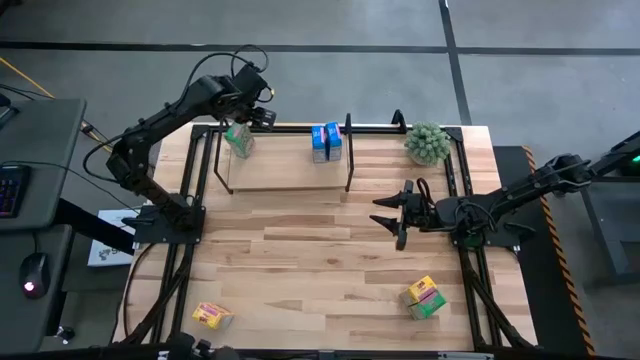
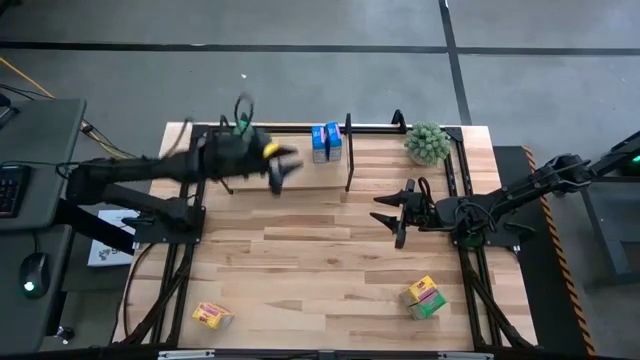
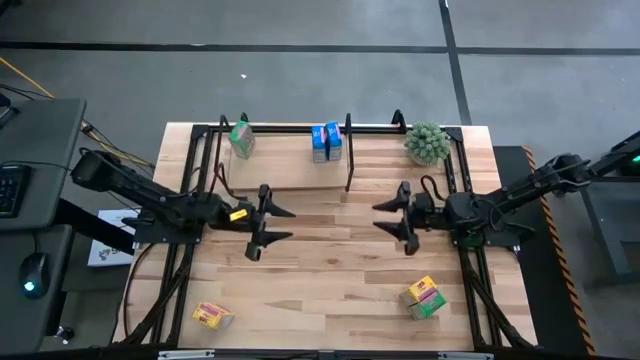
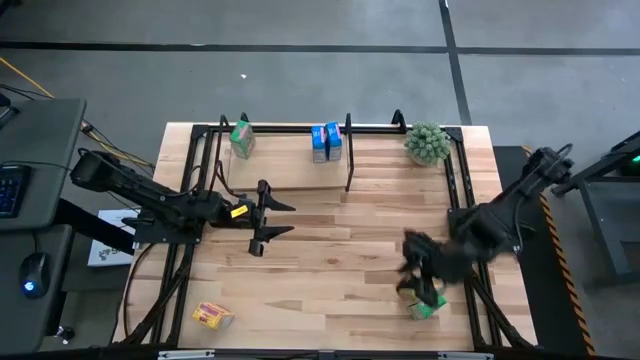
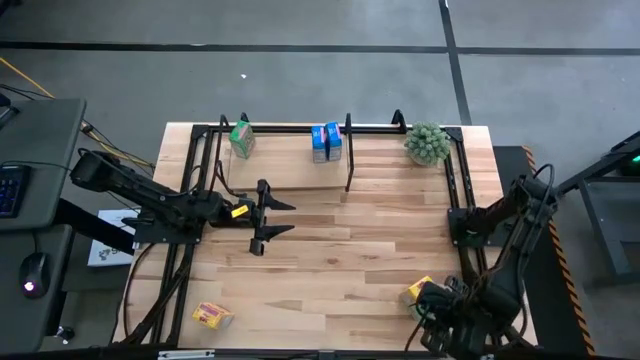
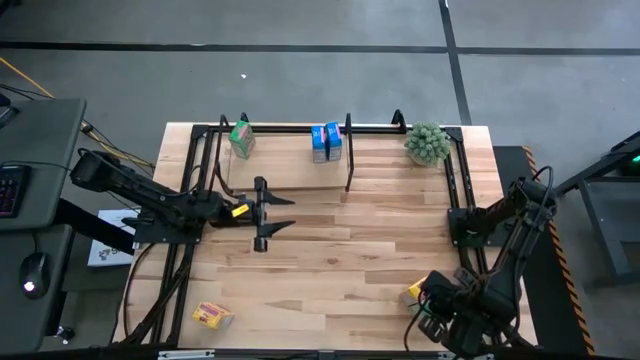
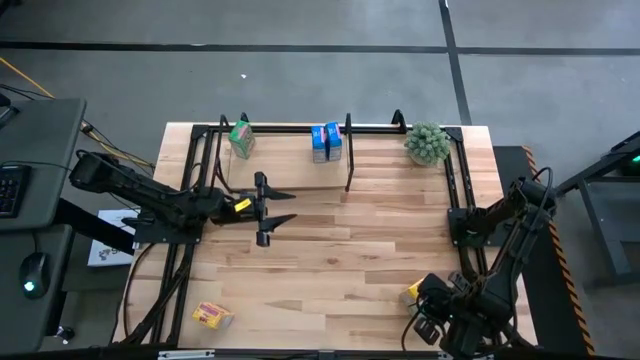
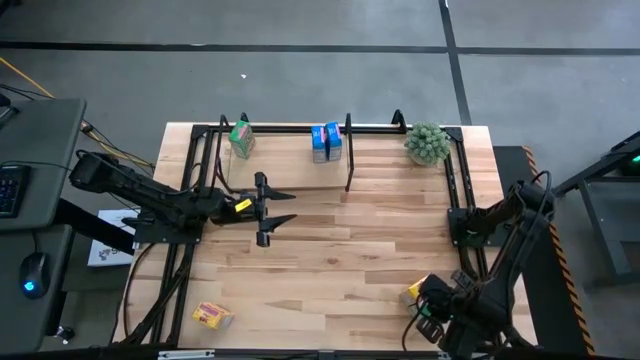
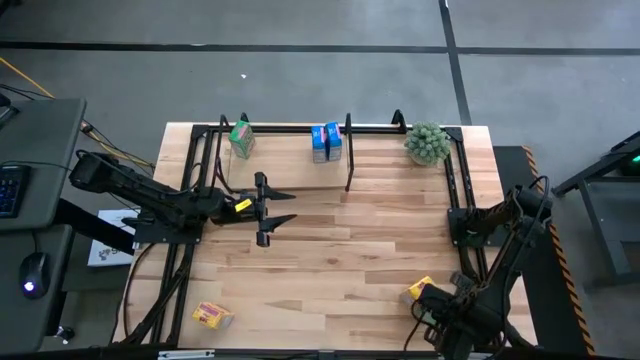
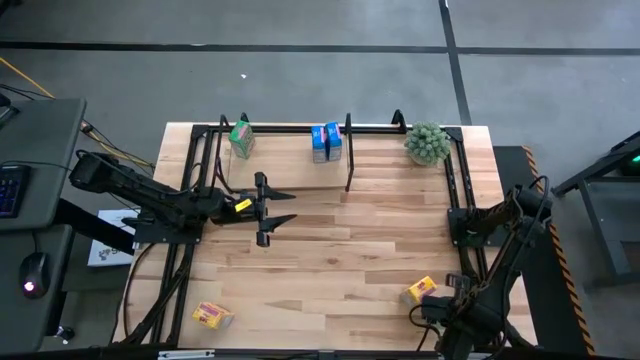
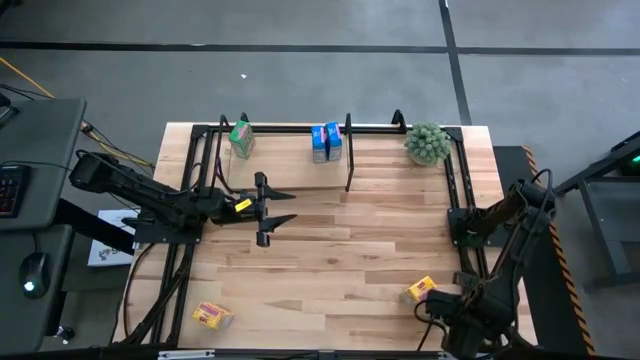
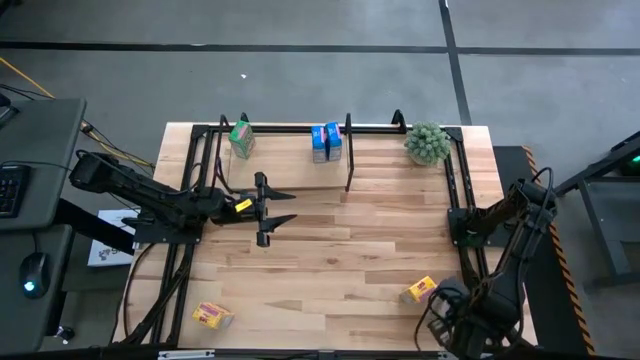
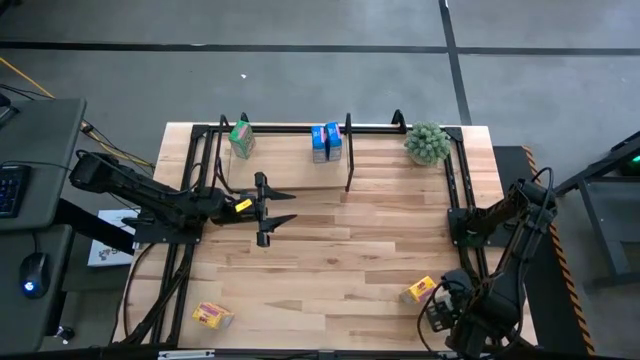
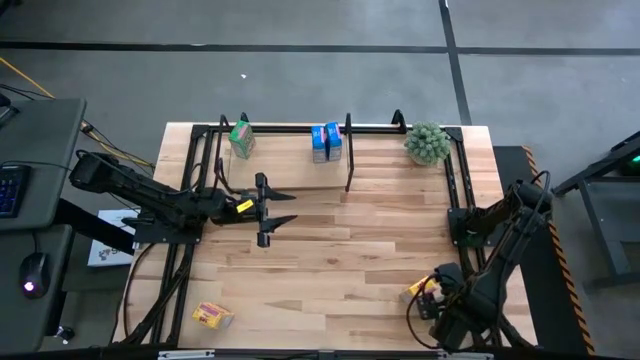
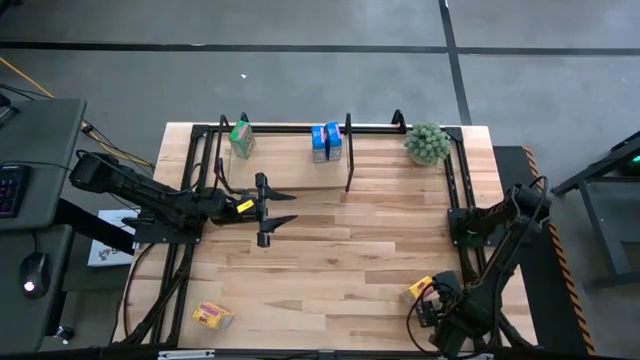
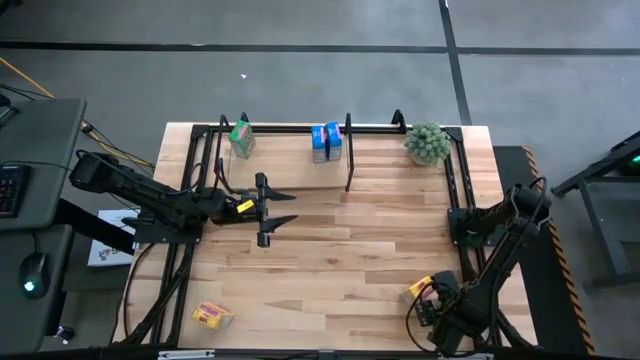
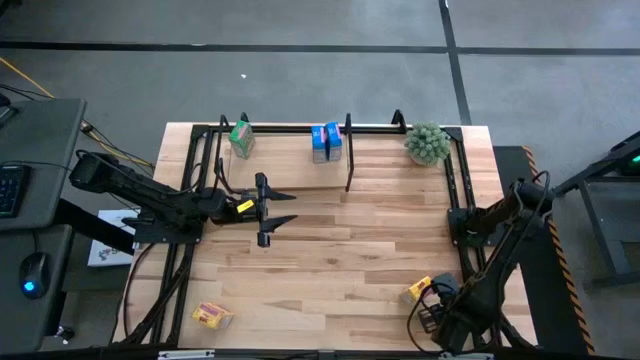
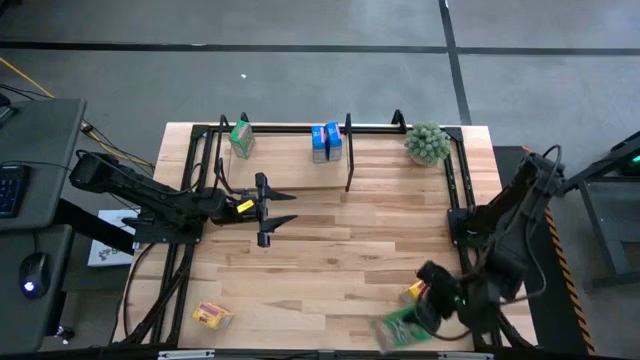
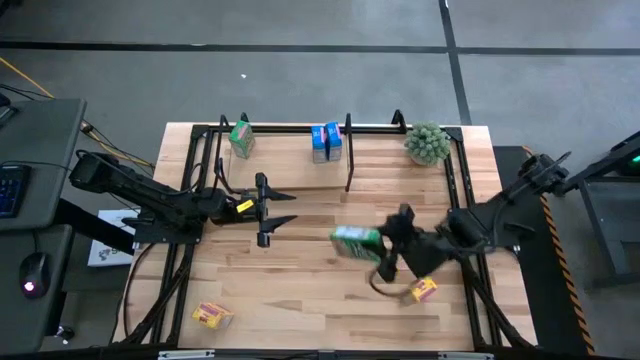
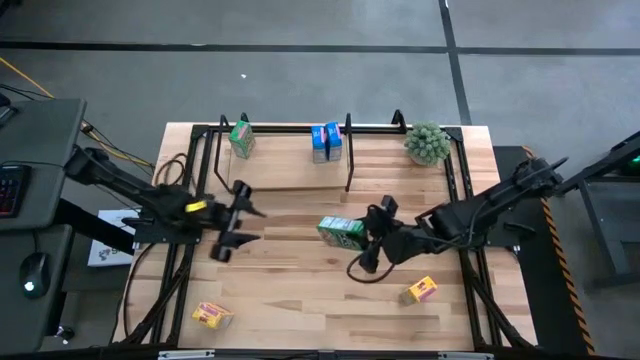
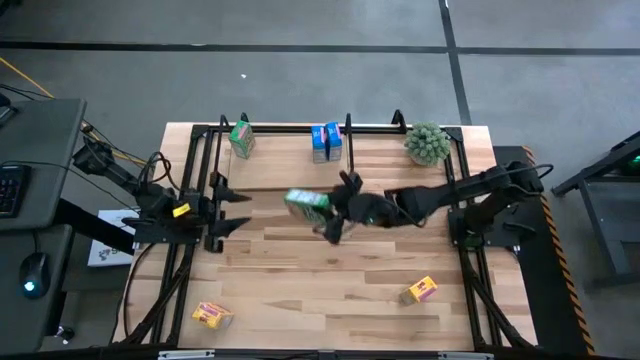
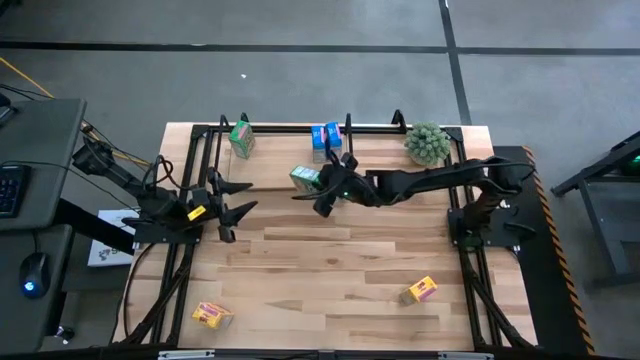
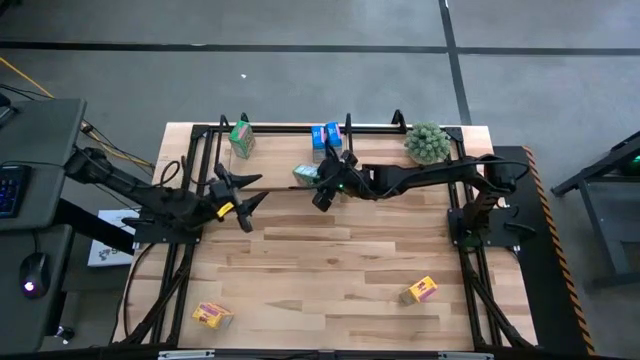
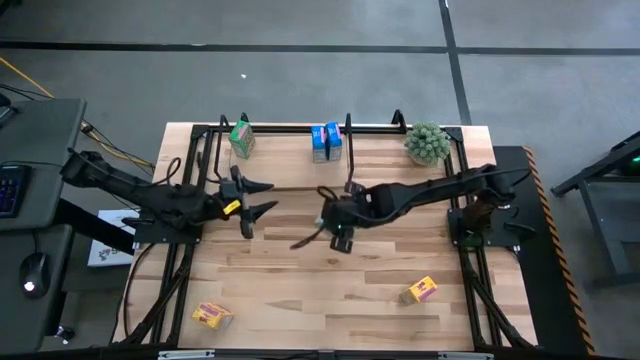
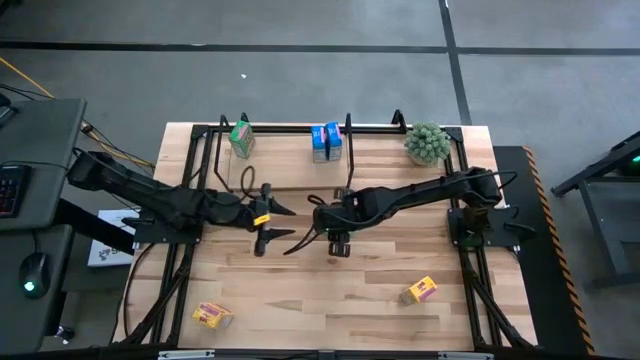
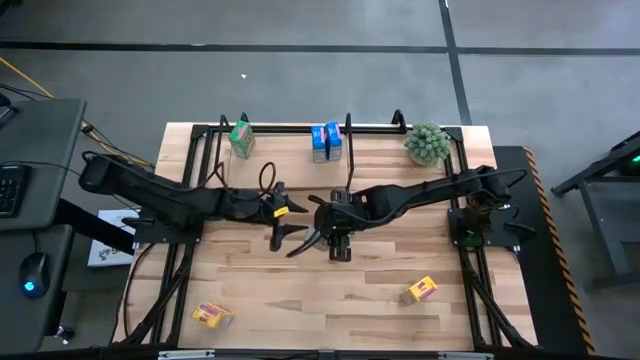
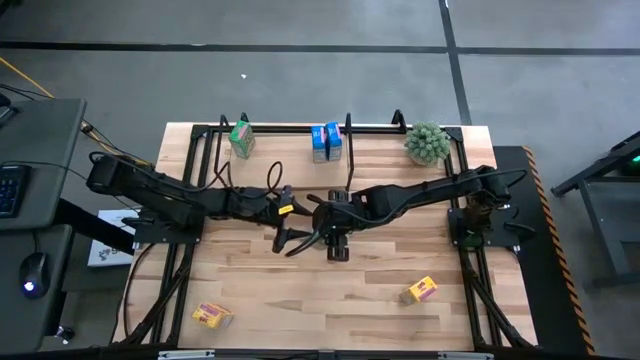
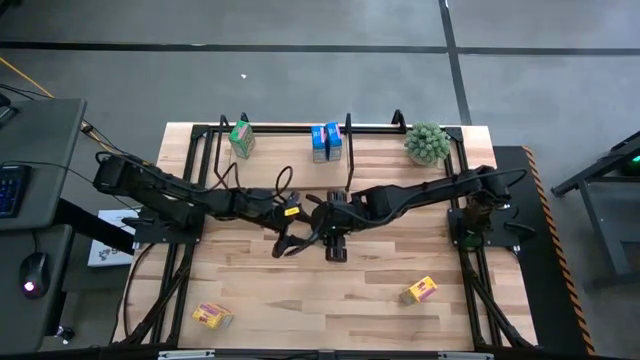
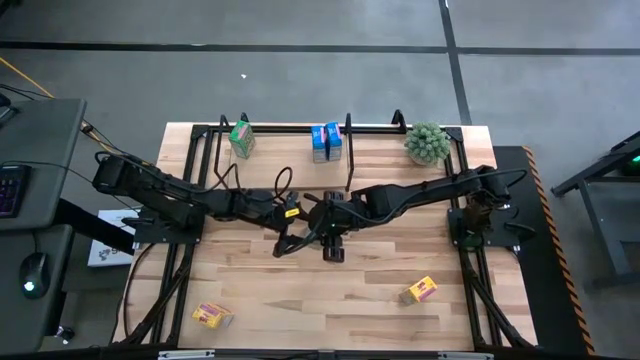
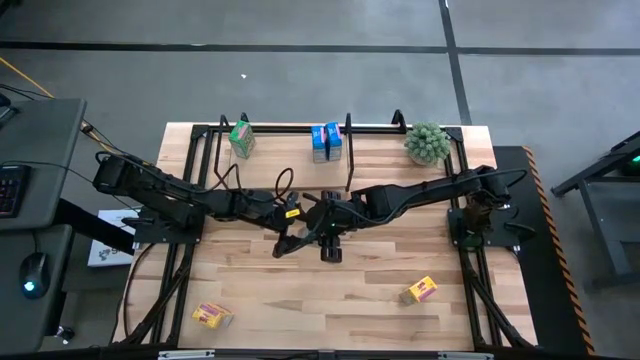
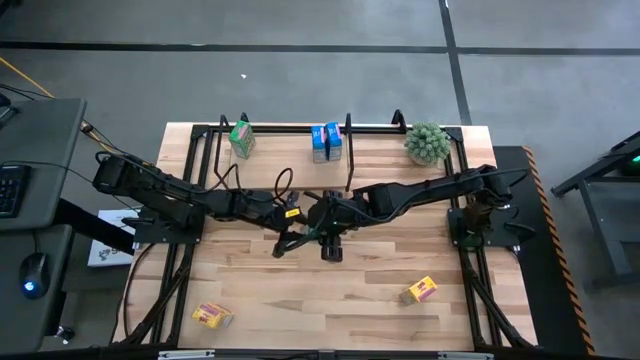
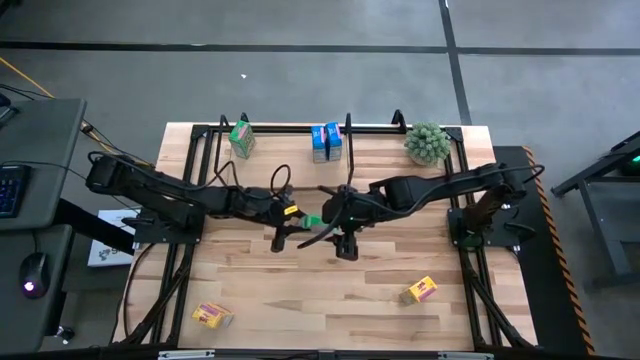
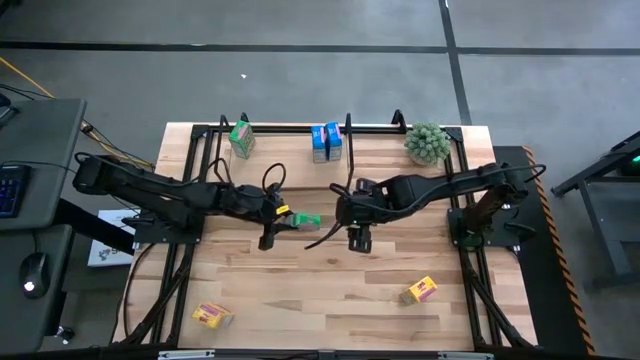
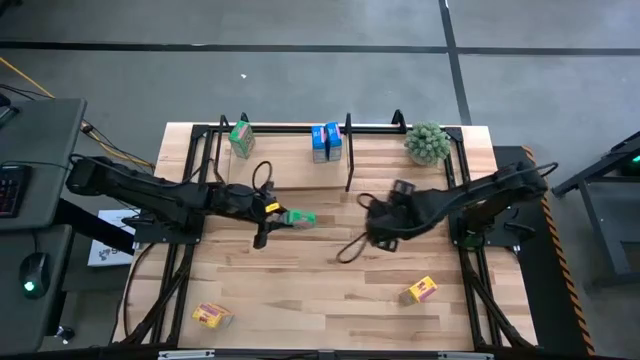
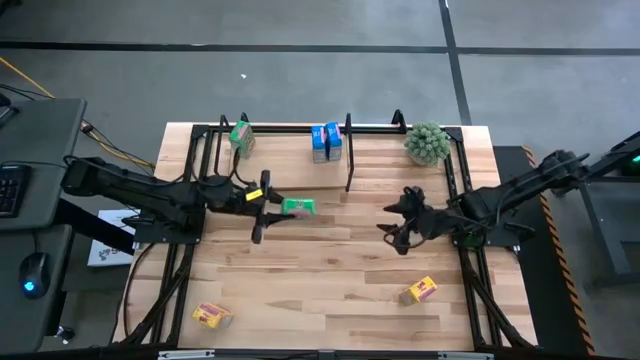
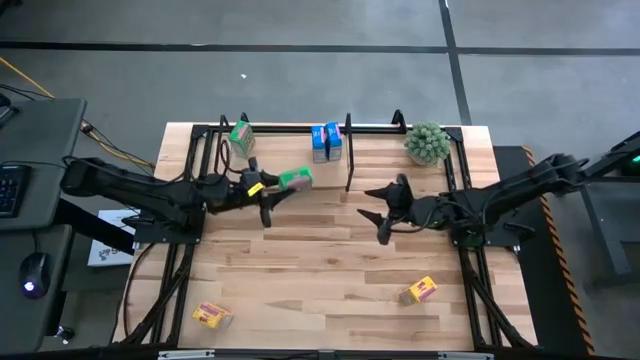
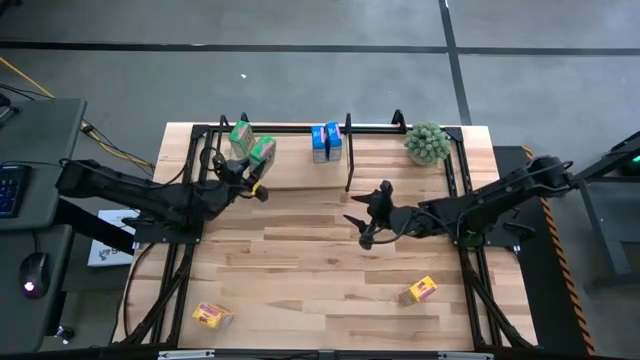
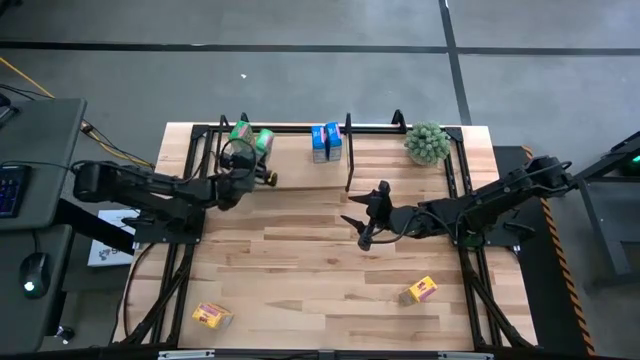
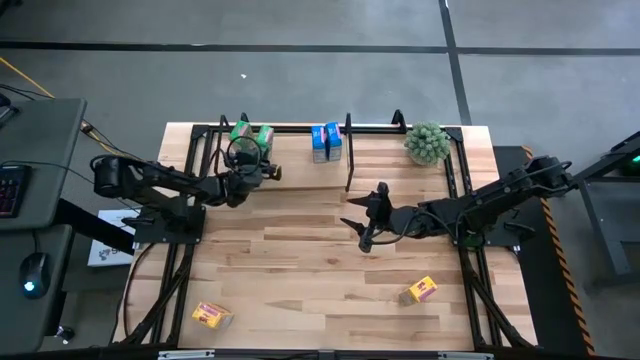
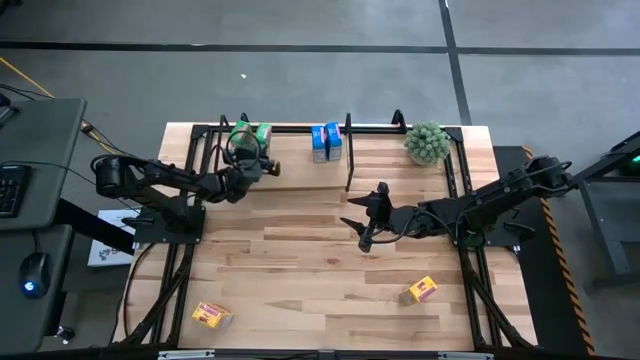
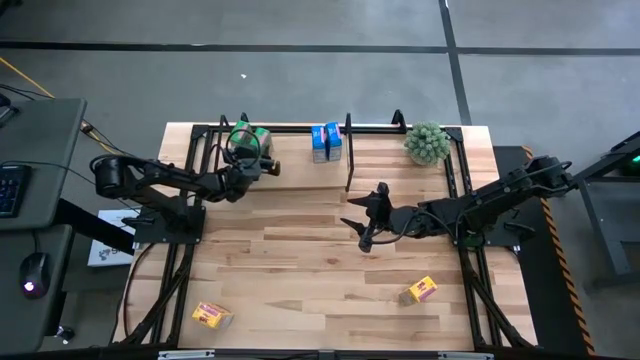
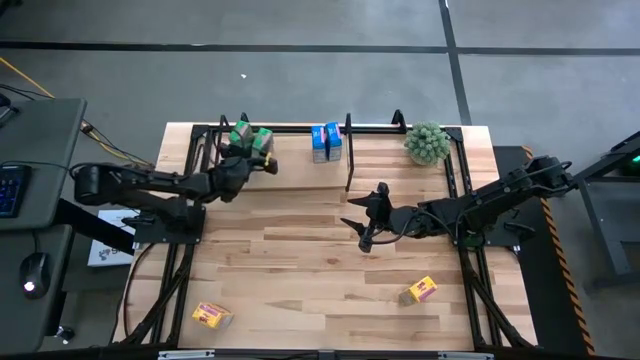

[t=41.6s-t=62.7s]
Task: Stack cereal on shelf
Put the green cereal box on the shelf aligned with the green cereal box

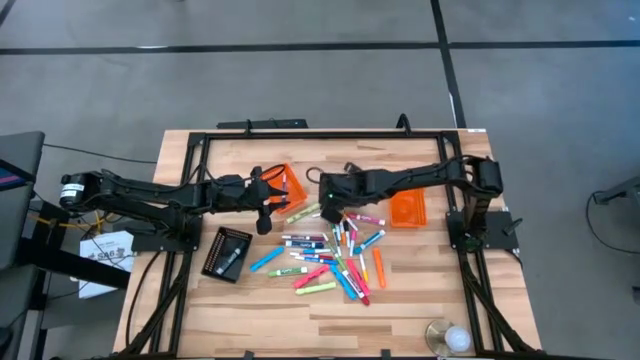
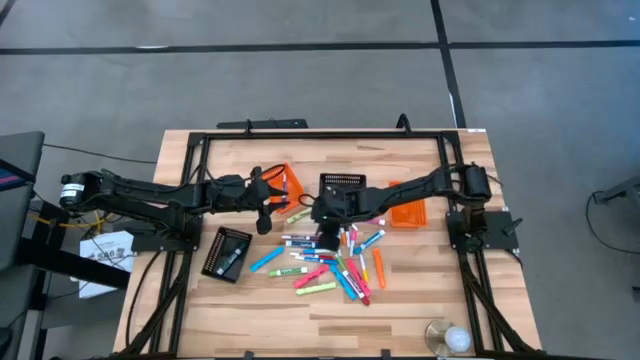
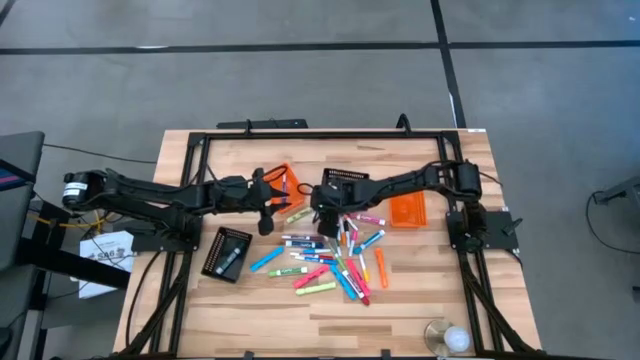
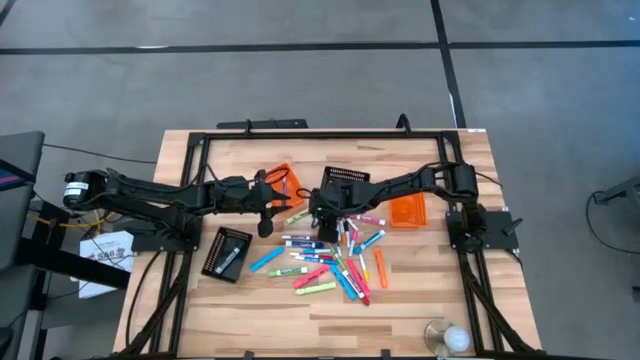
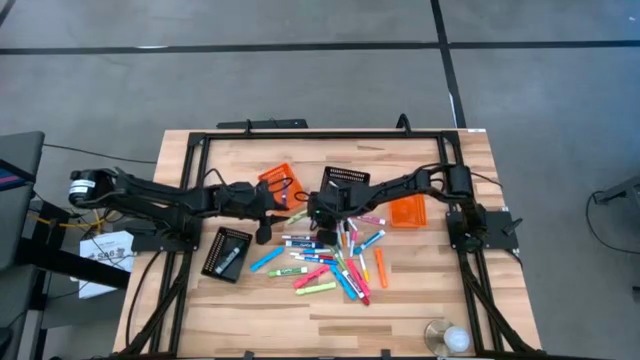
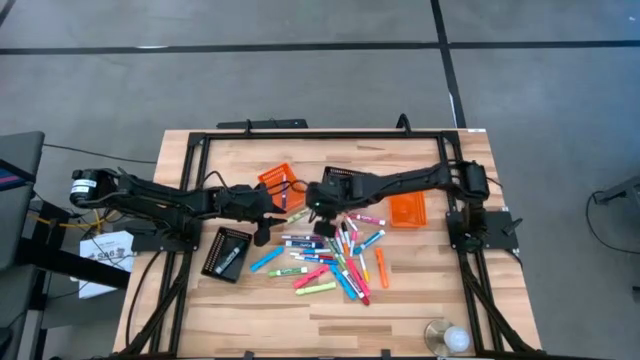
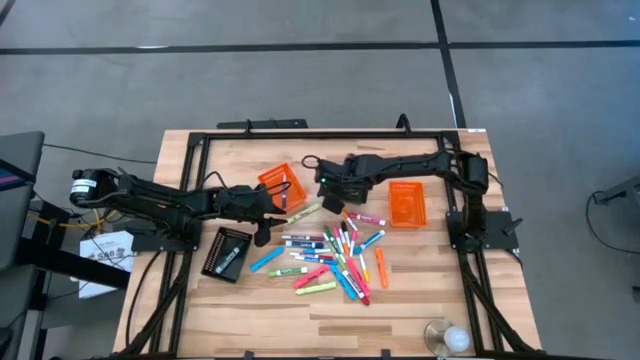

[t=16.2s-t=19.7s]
Task: Pick & Place Markers
Put the yellow highlighter into the right black bin
